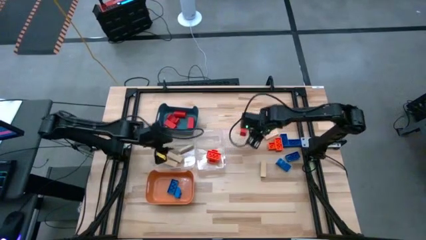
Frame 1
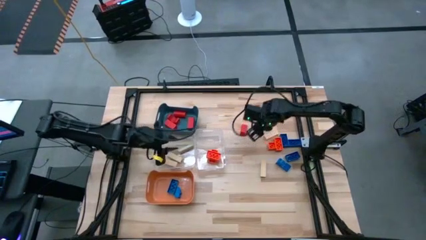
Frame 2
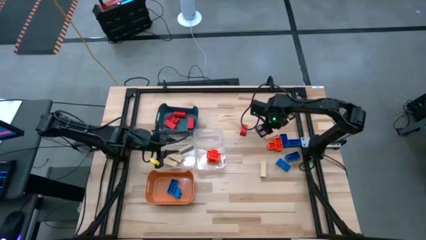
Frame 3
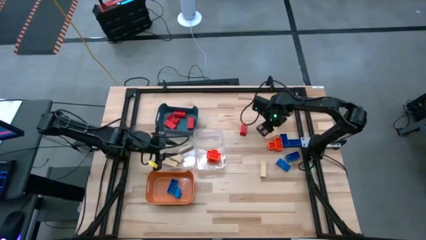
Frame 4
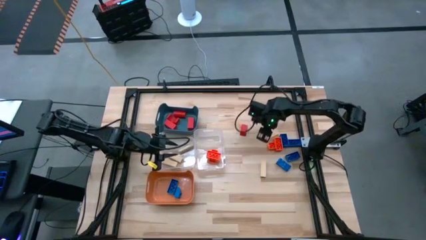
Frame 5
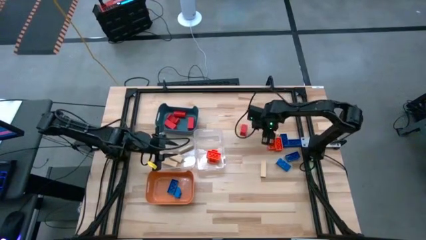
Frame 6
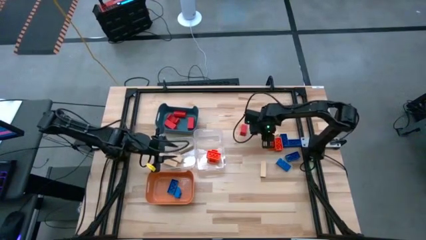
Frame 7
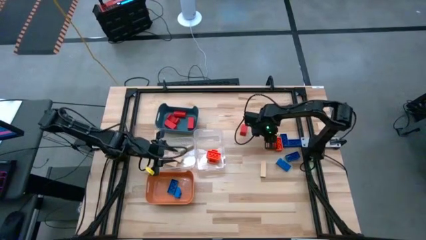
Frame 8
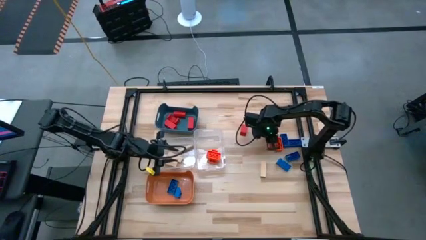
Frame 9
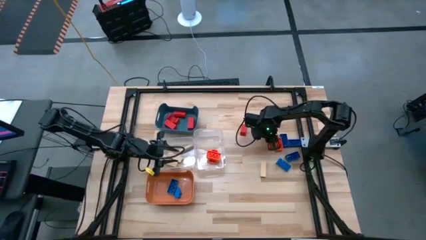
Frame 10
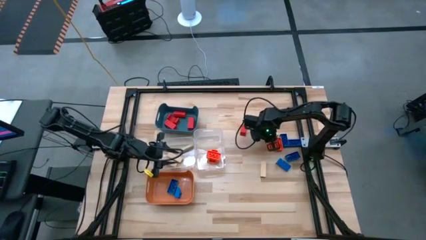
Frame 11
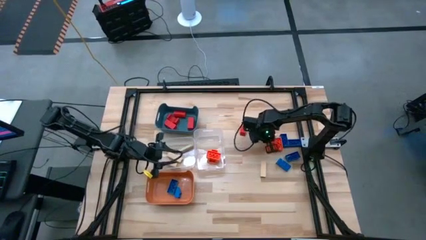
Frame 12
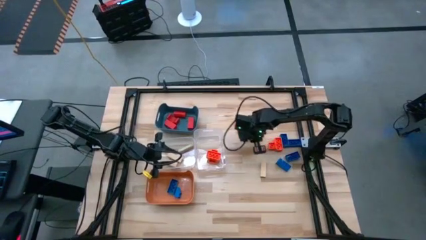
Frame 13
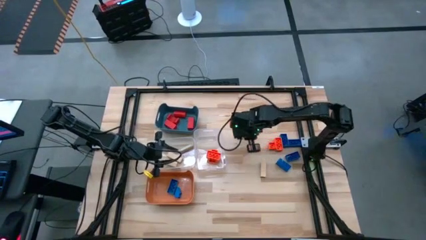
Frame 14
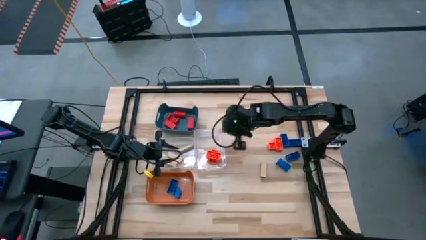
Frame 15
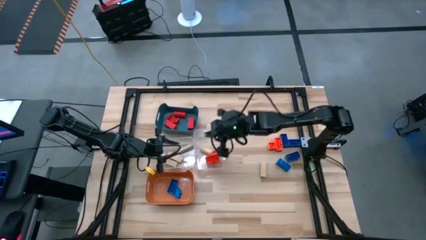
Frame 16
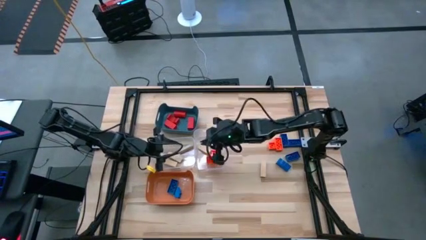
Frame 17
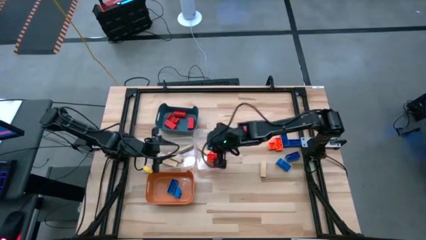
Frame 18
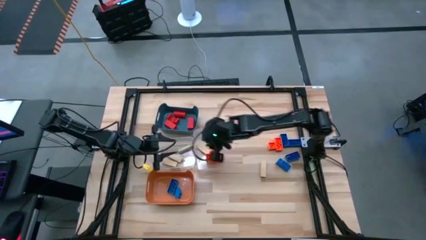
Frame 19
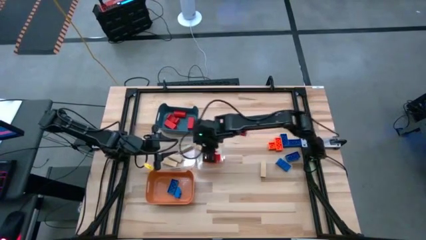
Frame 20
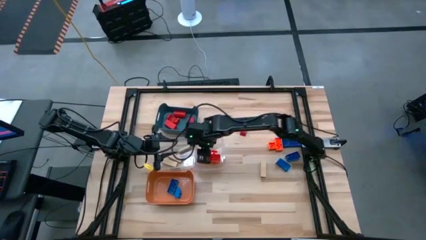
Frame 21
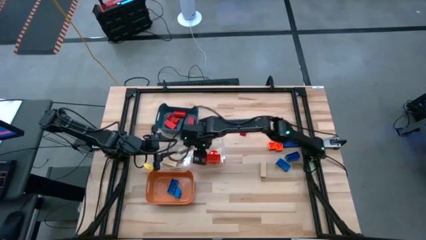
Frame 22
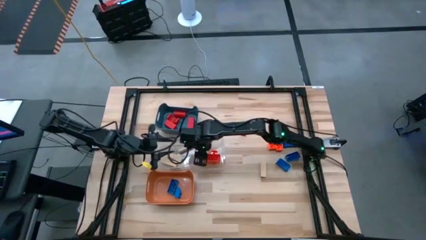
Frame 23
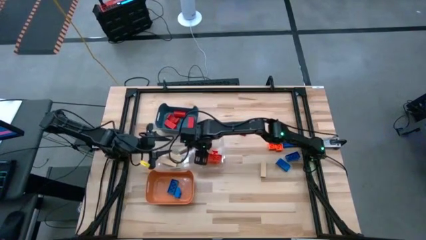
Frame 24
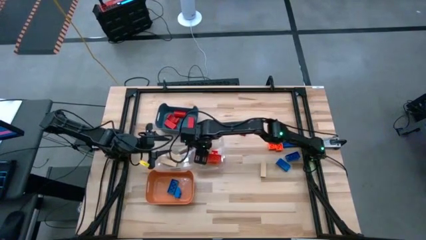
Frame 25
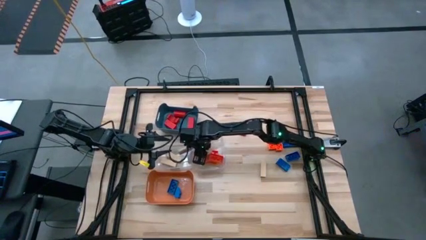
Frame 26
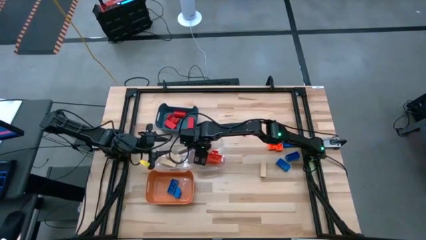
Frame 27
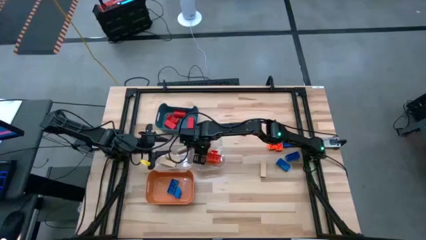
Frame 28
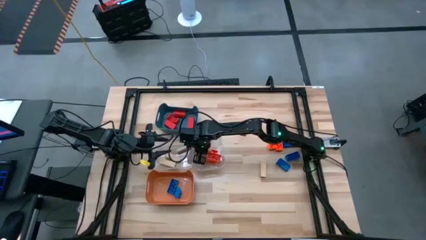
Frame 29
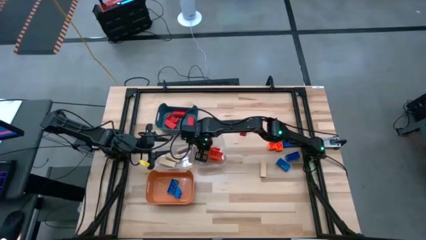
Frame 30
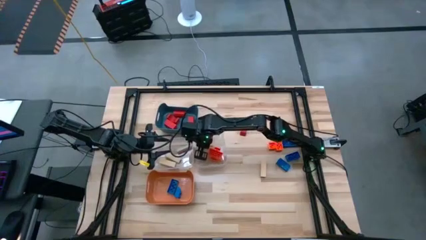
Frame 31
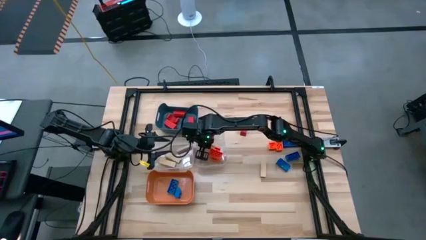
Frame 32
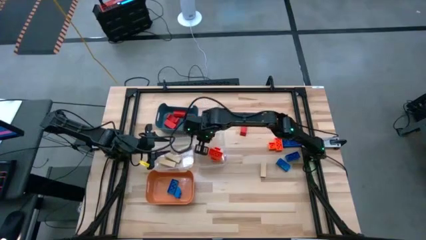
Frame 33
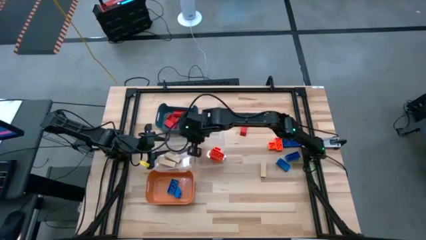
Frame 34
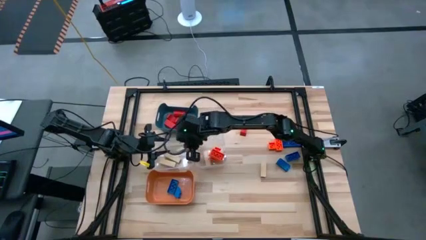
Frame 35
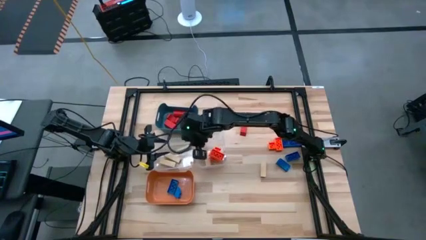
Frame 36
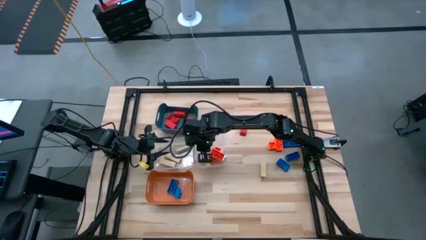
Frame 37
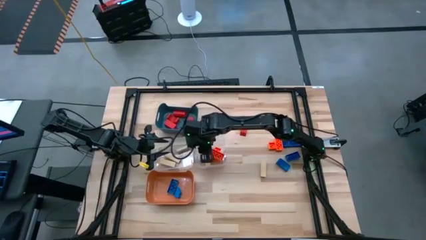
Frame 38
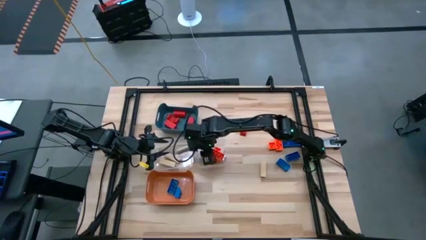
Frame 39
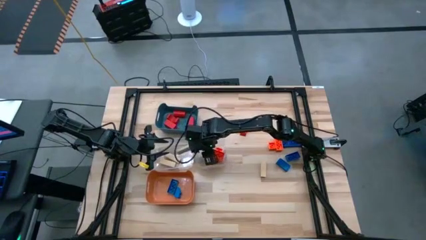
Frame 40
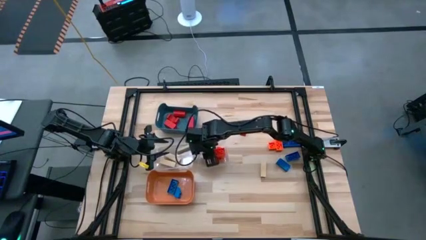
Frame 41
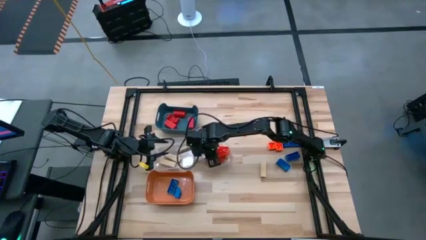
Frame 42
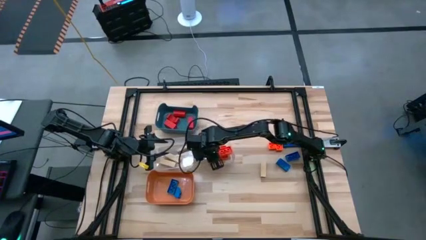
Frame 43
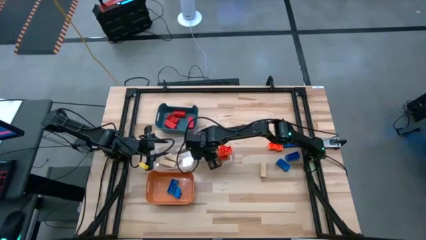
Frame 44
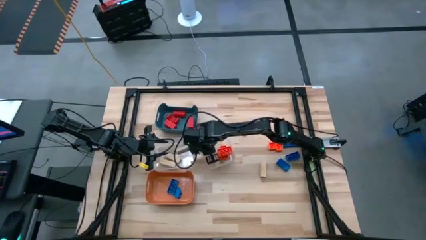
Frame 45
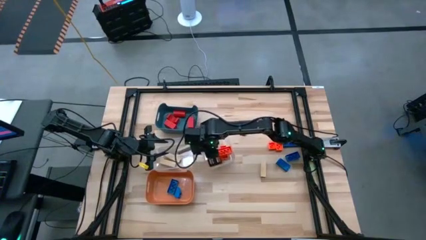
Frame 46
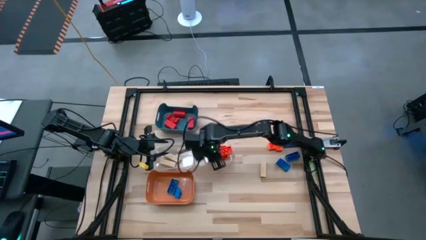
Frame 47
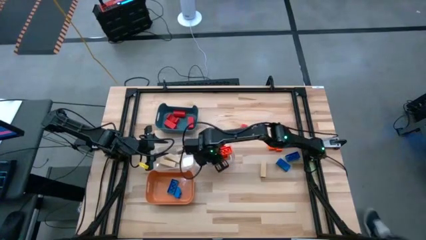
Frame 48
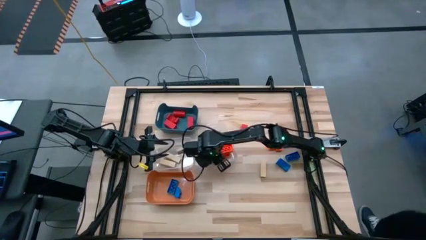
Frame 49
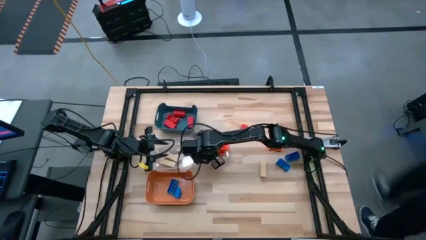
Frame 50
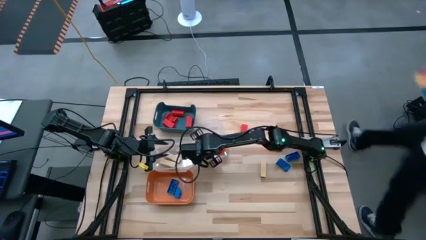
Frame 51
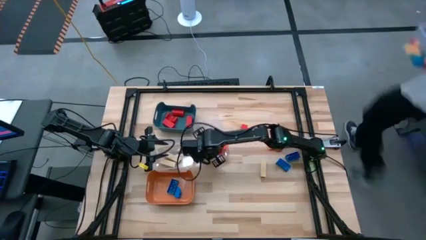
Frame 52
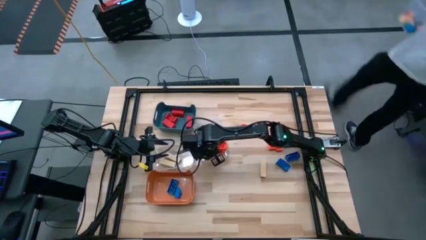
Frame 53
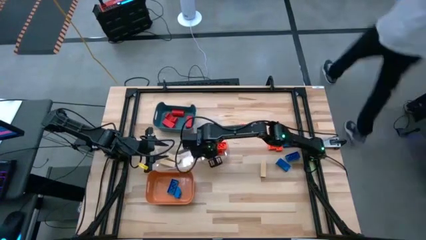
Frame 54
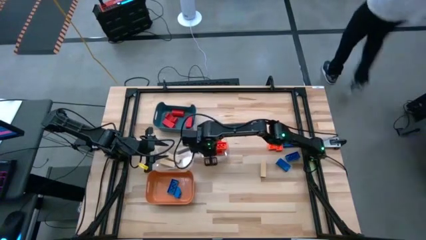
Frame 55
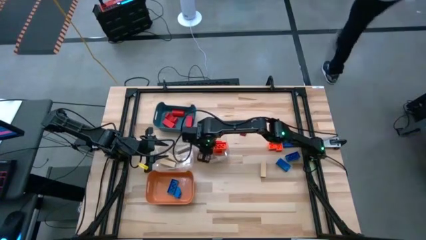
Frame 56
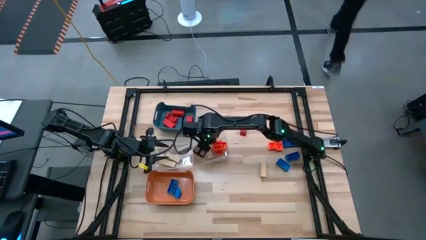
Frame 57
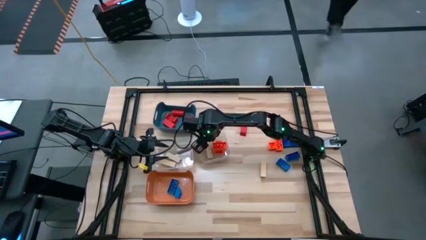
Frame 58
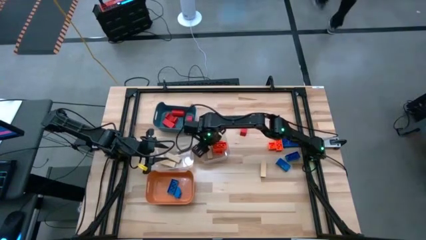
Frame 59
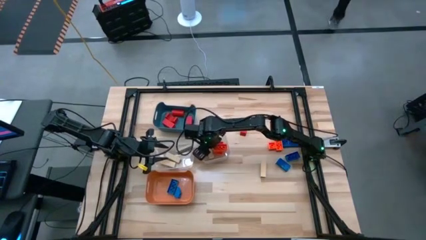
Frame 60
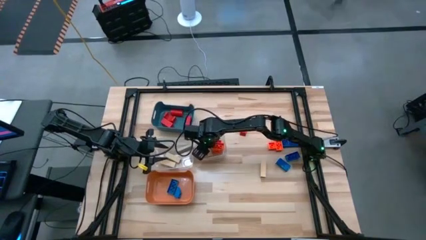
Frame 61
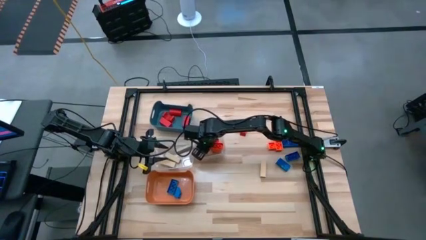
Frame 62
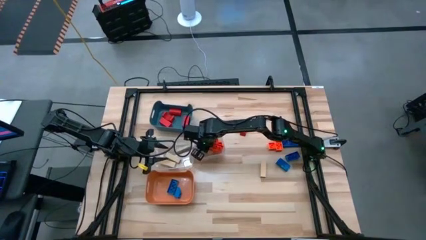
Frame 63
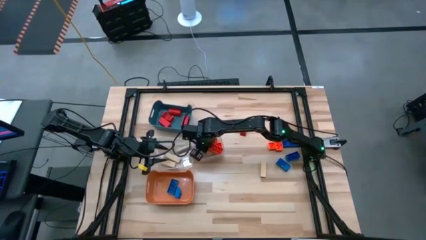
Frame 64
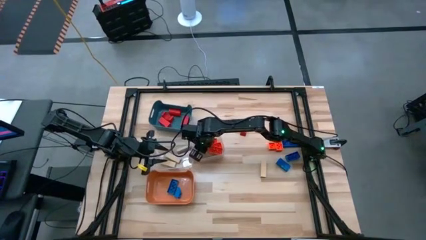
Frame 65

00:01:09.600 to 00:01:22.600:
Task: Sort blocks
Put the brown block into the left transparent bin

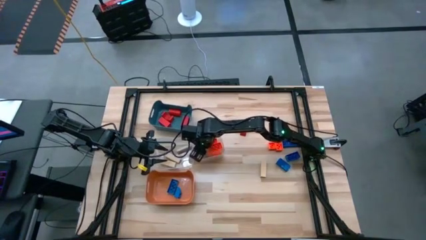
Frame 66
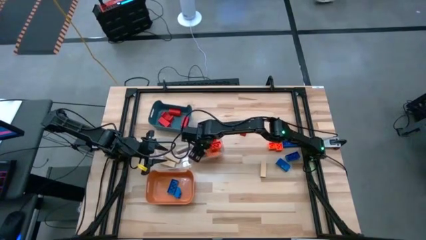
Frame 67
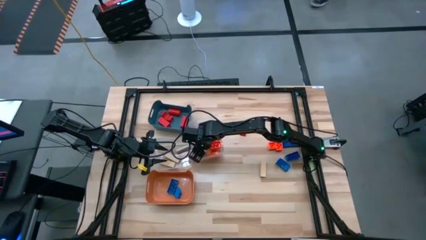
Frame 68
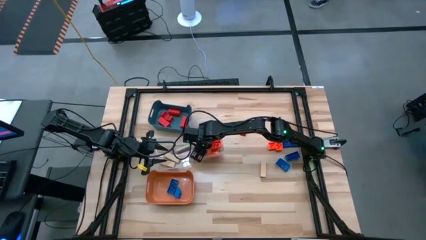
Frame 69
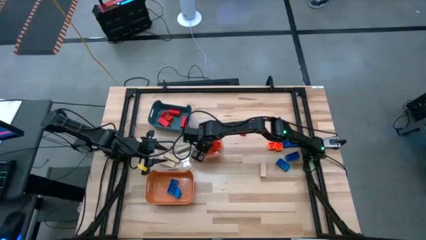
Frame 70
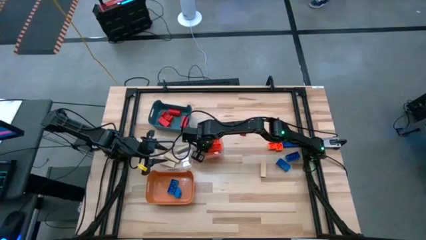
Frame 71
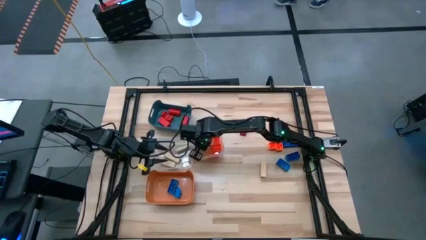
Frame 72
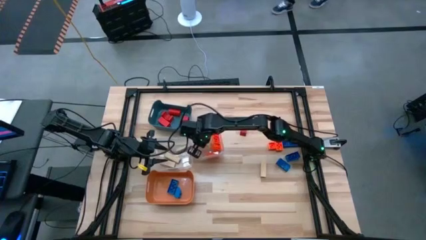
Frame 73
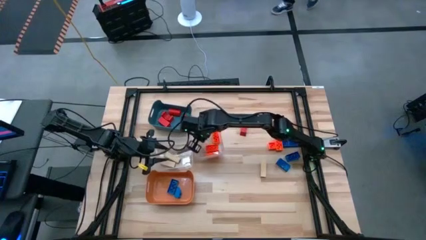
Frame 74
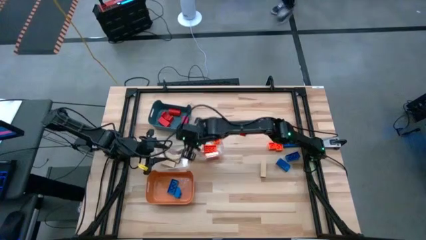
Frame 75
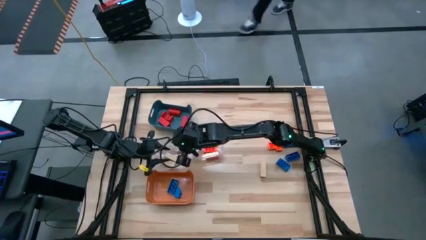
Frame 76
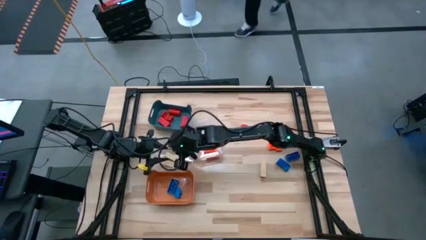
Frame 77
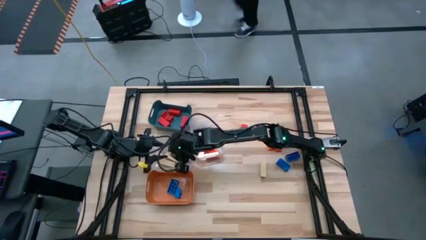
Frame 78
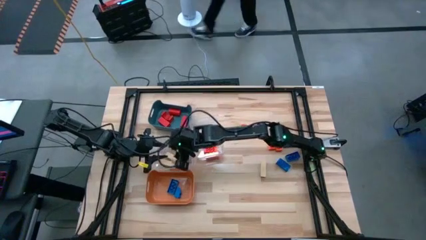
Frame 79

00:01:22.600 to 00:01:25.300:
Put the brown block into the left transparent bin

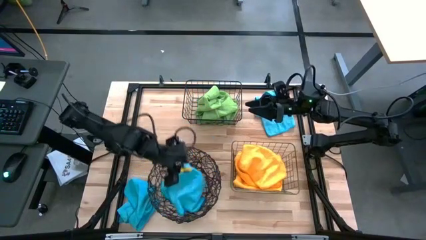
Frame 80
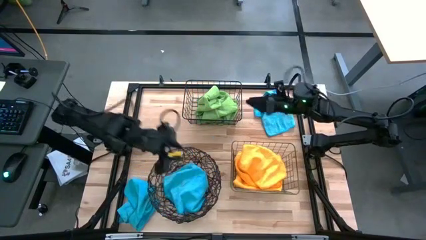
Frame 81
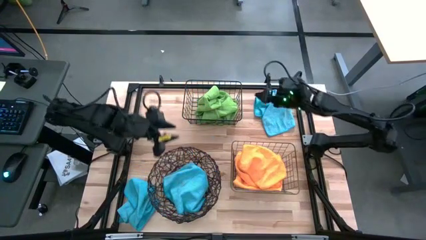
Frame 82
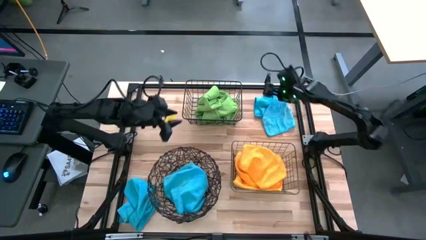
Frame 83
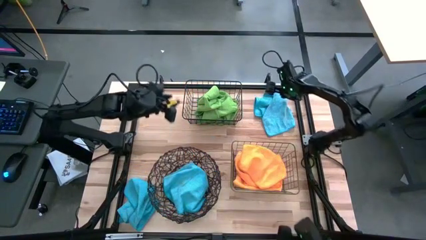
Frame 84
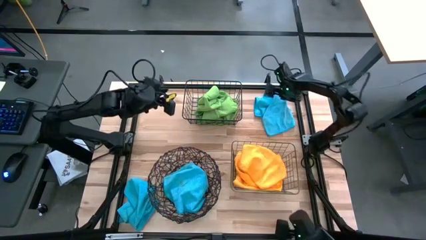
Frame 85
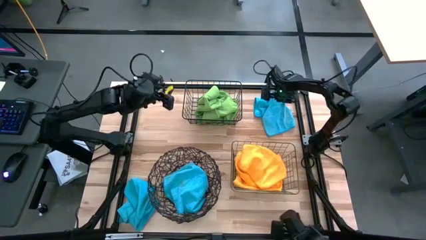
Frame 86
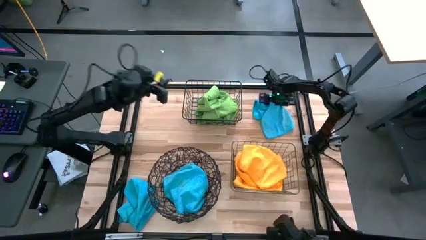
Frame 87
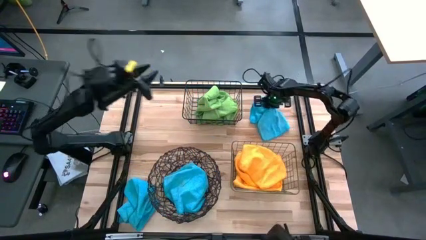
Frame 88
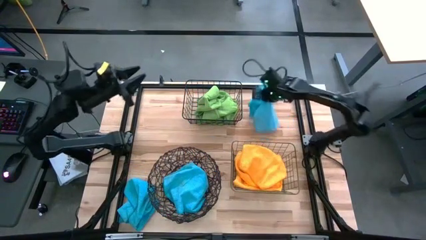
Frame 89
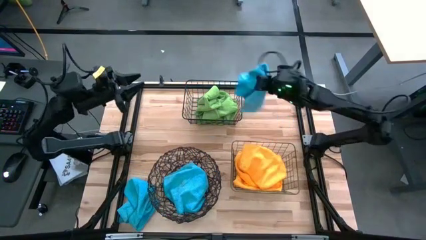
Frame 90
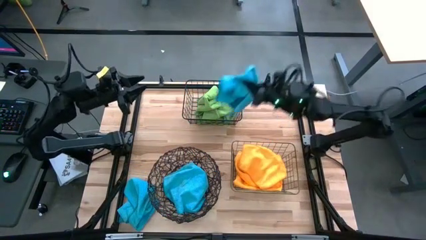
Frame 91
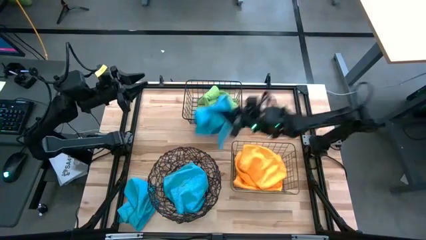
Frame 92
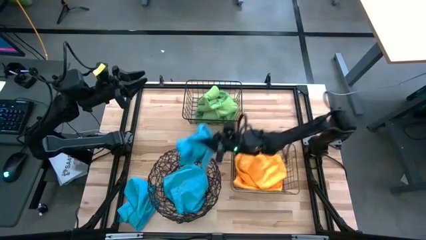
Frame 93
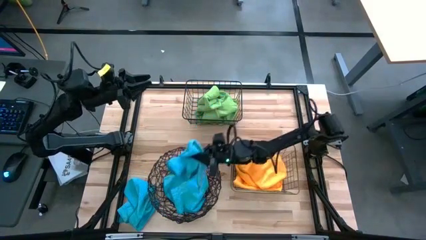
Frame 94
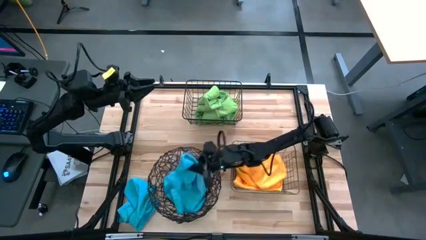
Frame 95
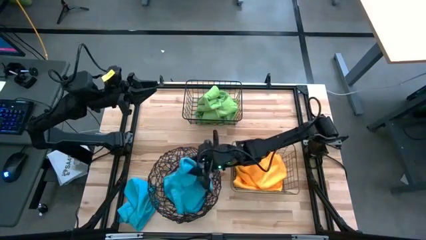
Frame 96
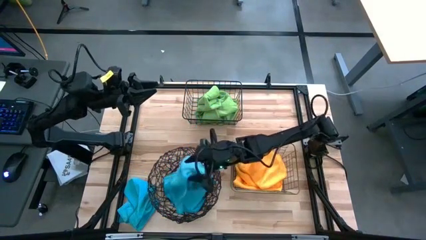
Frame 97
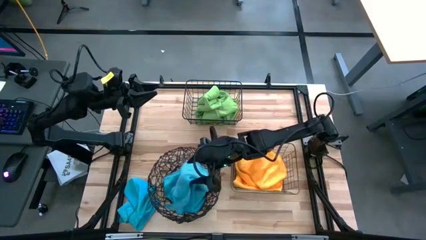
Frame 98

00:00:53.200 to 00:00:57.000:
Task: Sort microfiber towel by color & place in baskets
Put the top blue towel into the bottom wire basket
